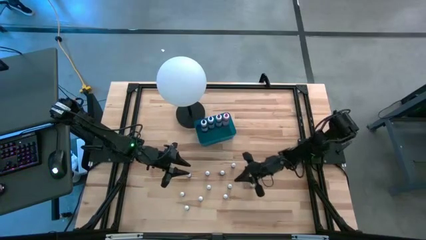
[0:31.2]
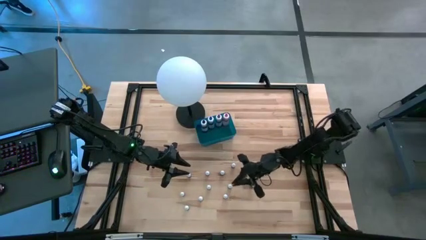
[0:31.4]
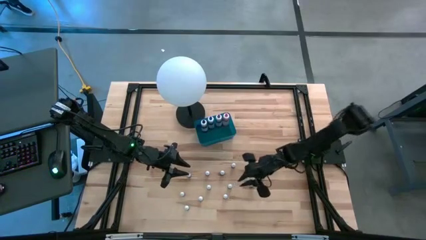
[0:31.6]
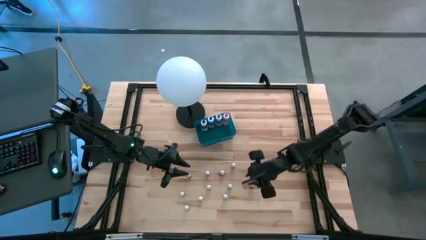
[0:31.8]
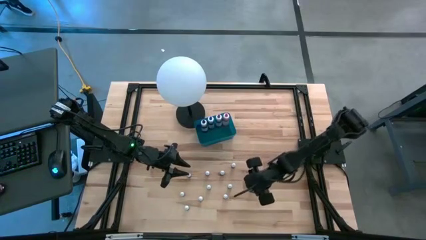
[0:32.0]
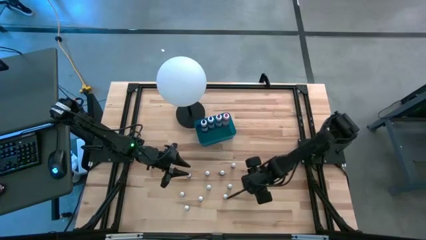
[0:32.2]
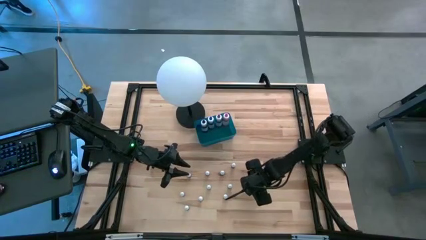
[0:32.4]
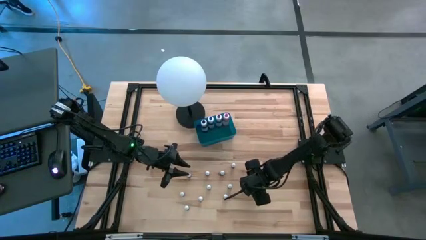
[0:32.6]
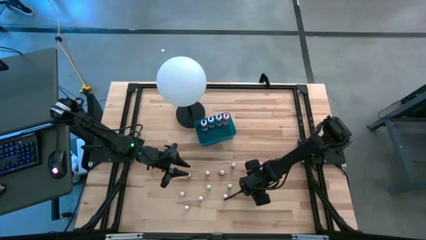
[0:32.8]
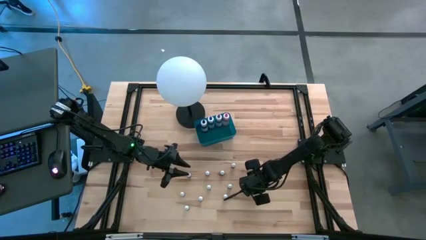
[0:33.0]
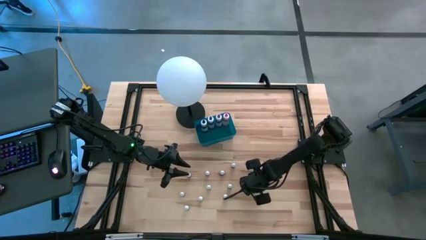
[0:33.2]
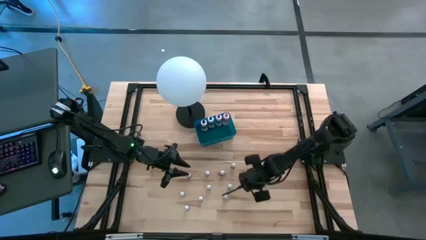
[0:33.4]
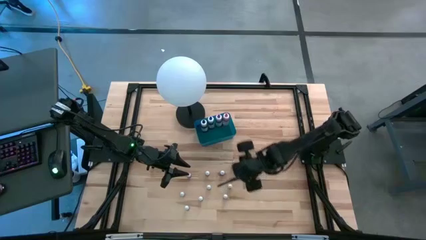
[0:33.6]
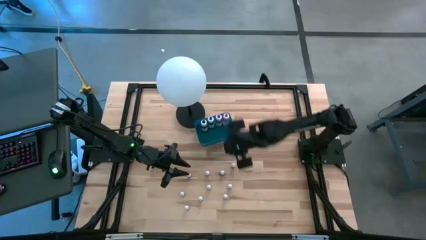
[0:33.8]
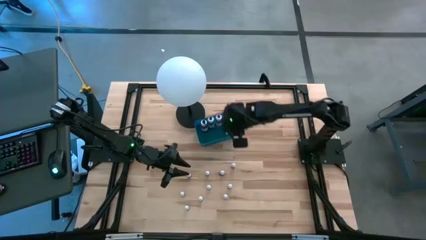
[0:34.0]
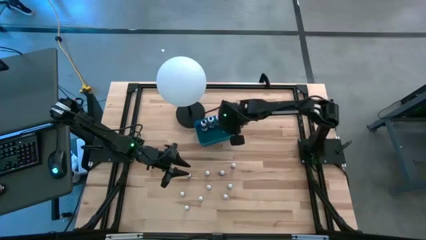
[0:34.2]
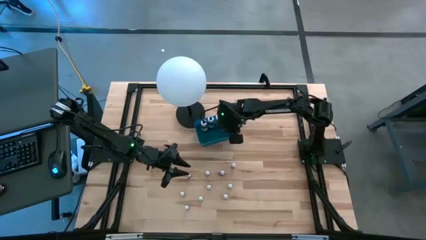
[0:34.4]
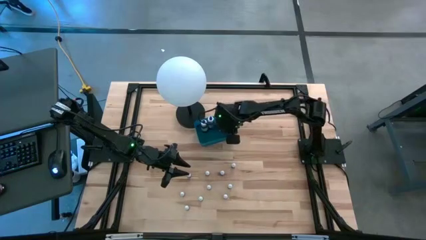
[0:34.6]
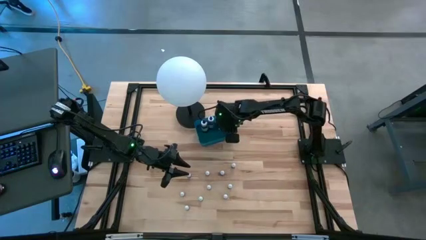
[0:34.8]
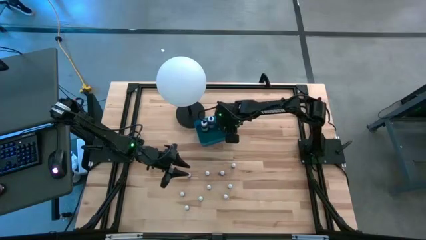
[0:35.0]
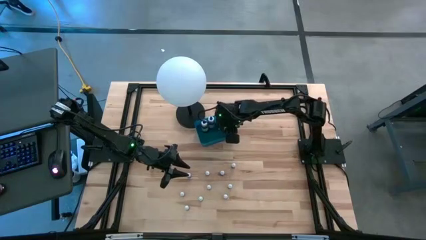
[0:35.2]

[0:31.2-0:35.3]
Task: Pick & Place food coloring
Put the black food coloring bottle into the bin

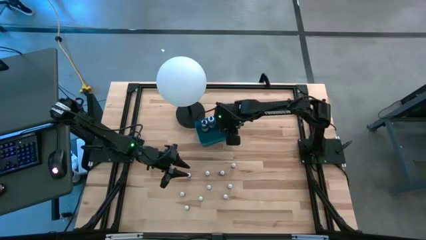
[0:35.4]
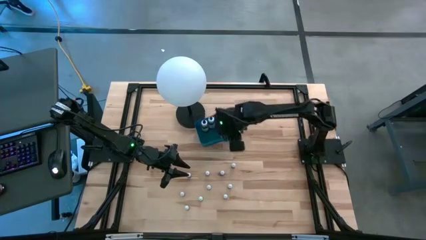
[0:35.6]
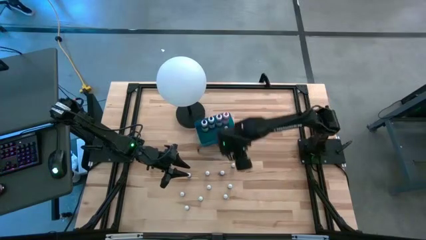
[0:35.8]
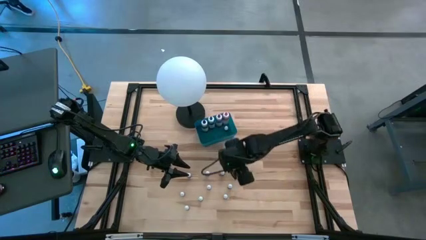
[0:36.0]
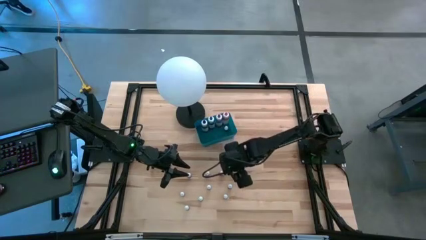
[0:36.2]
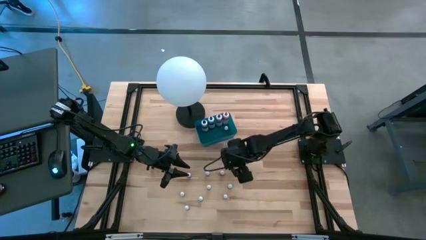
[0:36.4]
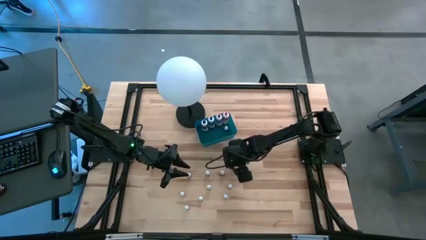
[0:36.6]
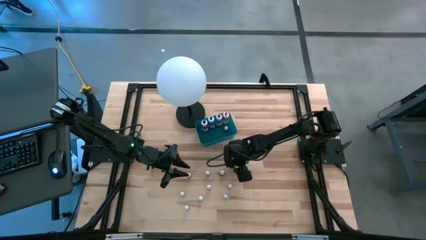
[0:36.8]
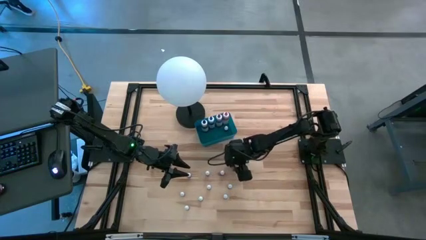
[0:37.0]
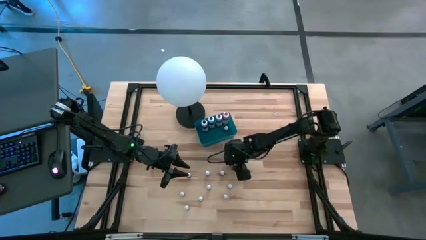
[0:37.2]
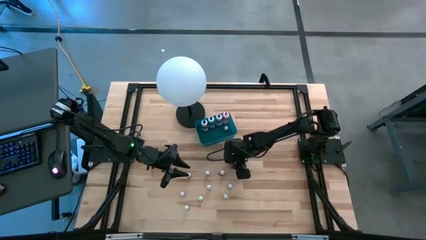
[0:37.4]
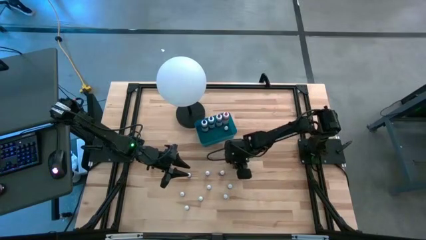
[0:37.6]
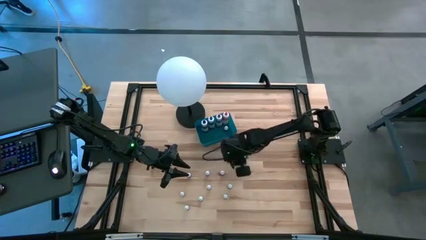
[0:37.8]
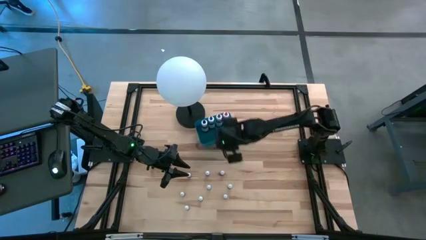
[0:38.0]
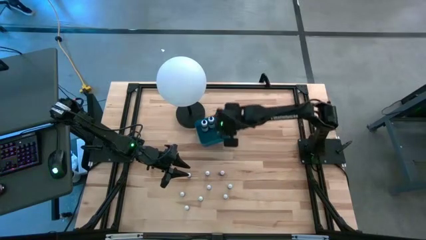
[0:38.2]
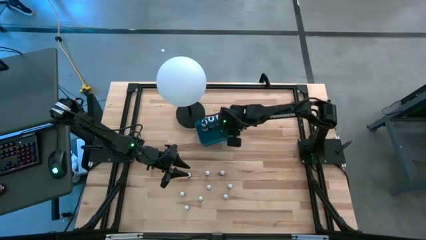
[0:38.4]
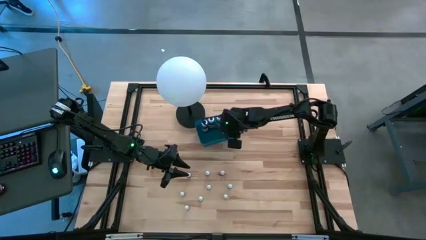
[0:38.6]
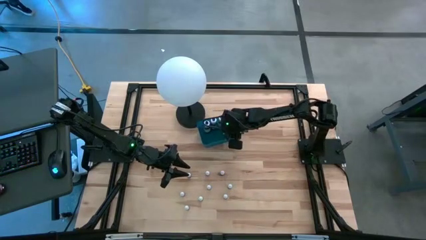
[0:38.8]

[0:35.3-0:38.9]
Put the black food coloring bottle into the bin

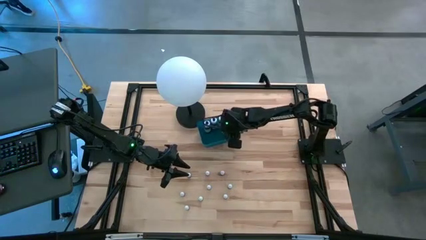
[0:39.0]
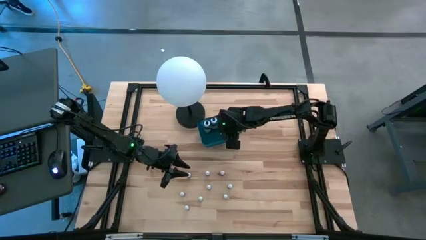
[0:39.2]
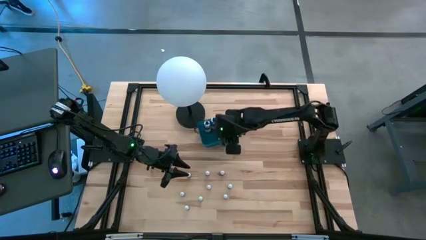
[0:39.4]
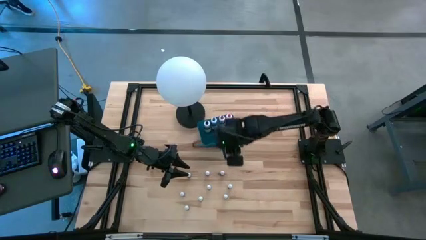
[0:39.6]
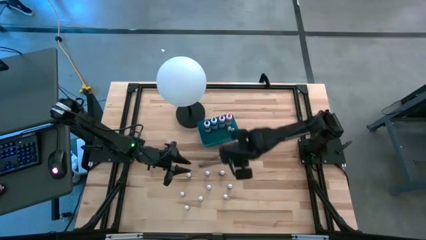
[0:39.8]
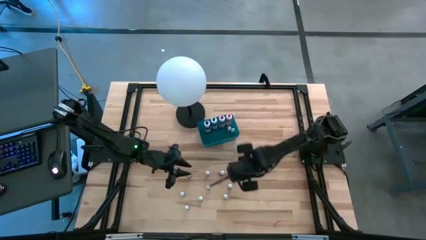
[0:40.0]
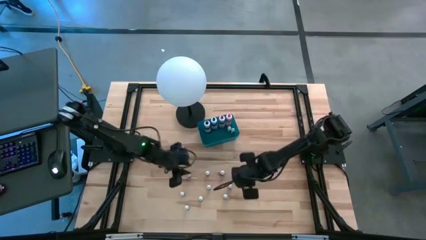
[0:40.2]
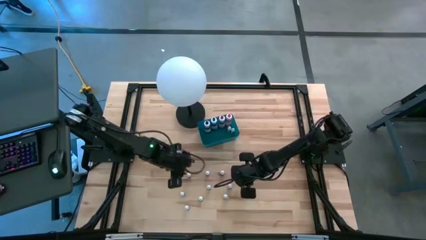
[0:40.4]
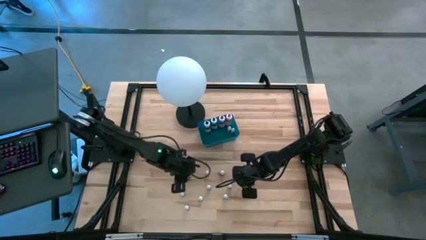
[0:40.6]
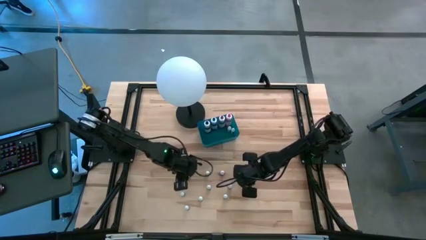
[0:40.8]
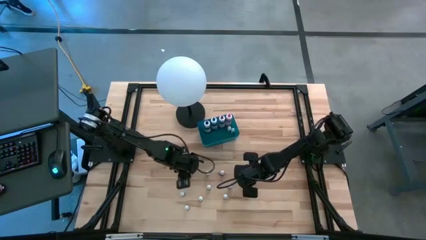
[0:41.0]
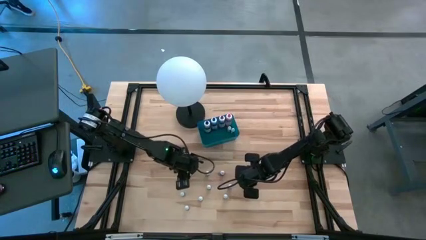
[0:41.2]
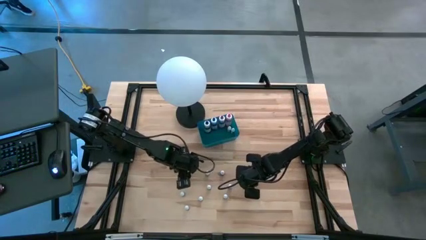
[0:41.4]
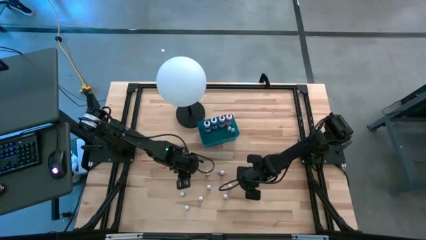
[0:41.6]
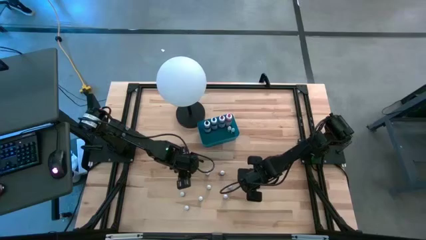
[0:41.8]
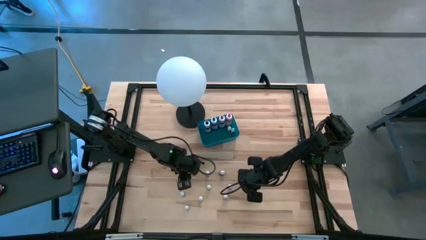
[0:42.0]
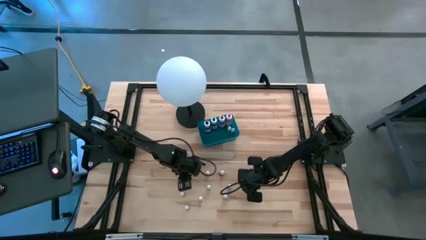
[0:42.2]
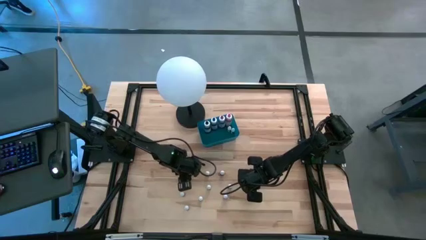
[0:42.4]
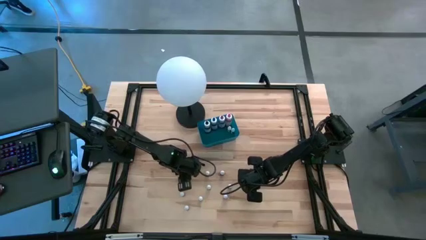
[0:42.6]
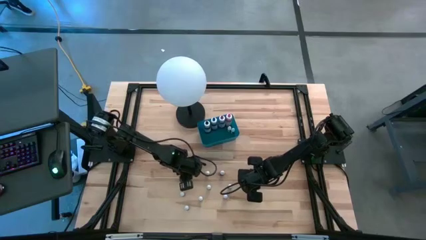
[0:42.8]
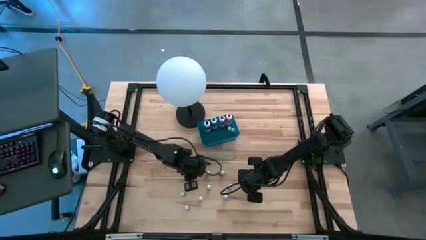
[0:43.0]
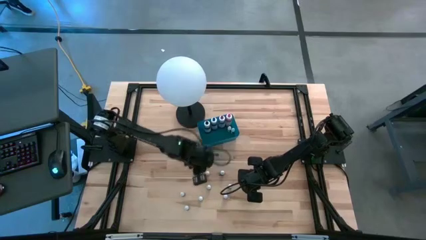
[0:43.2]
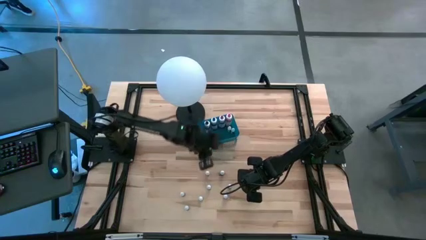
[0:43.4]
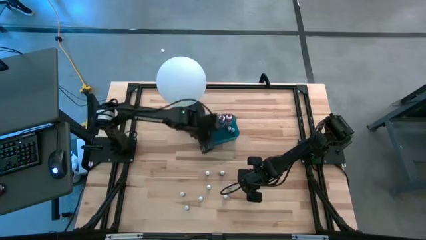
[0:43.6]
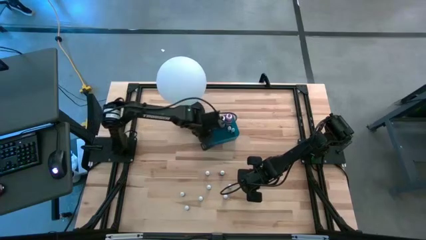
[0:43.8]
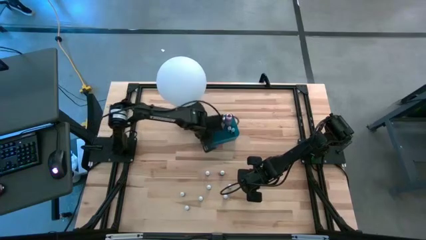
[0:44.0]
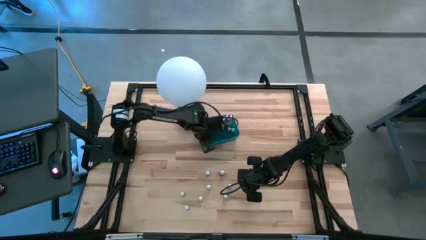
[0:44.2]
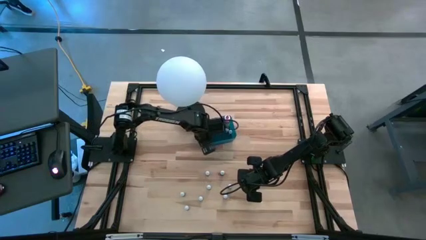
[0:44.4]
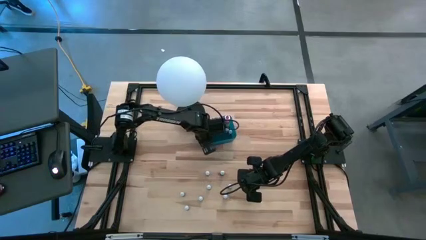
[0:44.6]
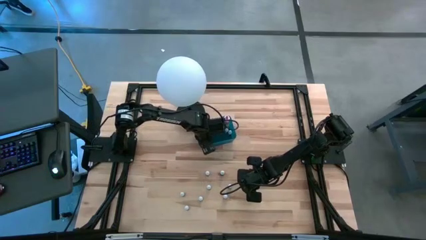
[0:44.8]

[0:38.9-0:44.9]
Put the green food coloring bottle into the bin

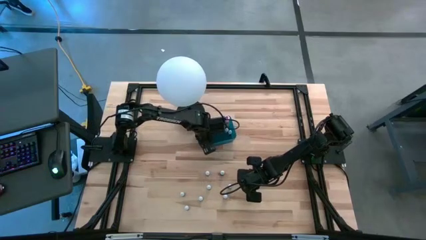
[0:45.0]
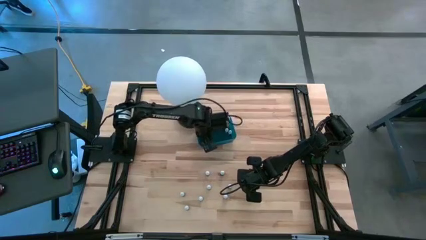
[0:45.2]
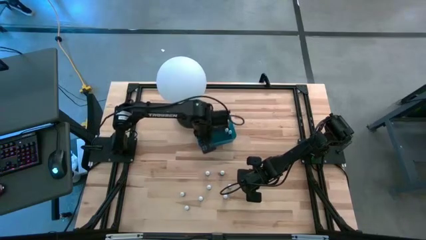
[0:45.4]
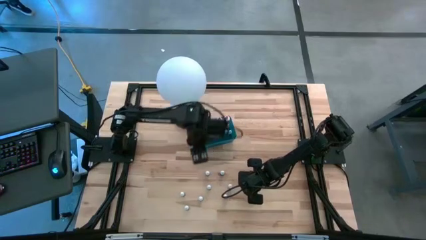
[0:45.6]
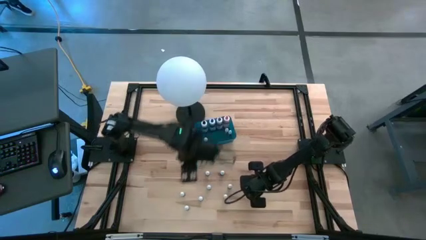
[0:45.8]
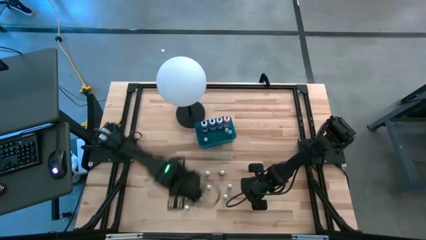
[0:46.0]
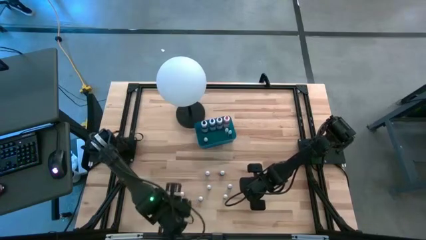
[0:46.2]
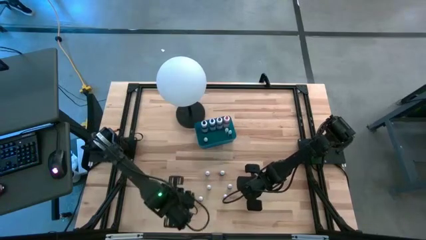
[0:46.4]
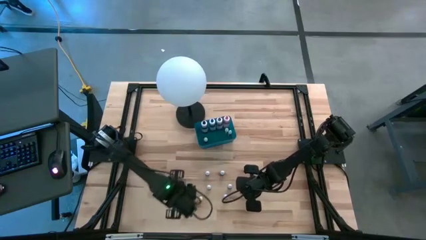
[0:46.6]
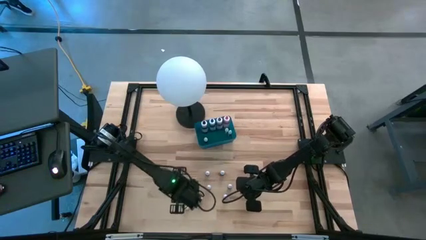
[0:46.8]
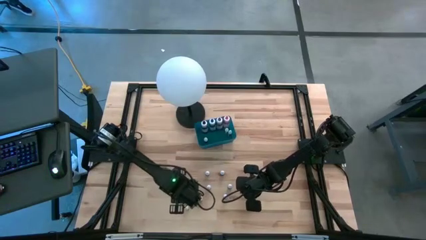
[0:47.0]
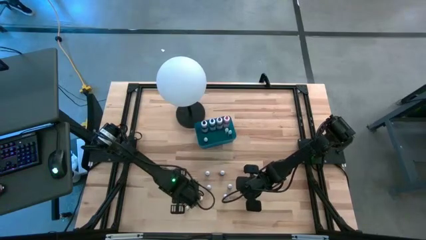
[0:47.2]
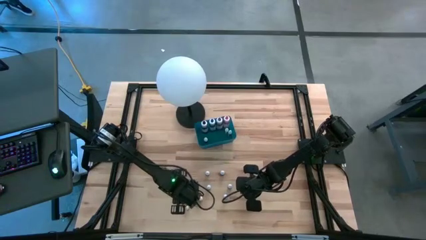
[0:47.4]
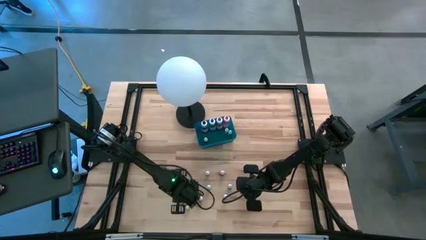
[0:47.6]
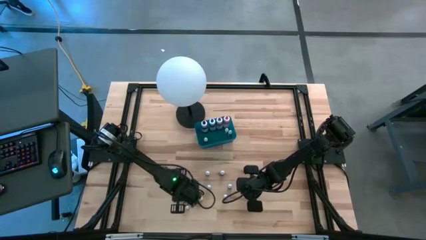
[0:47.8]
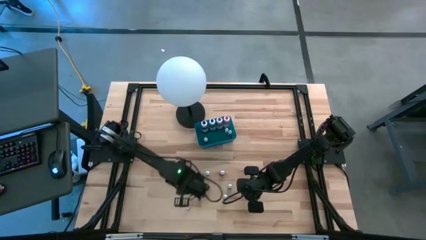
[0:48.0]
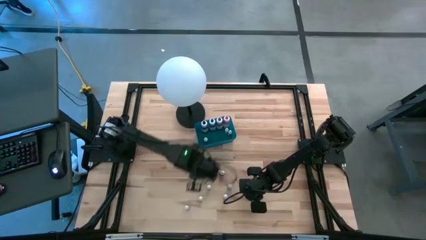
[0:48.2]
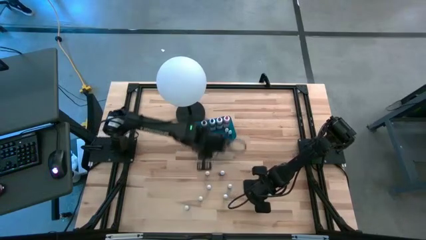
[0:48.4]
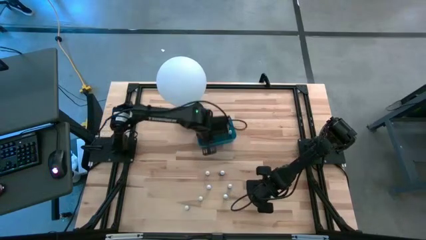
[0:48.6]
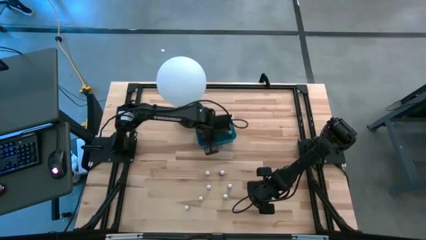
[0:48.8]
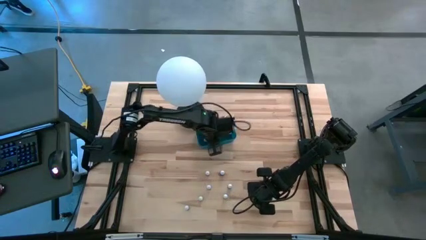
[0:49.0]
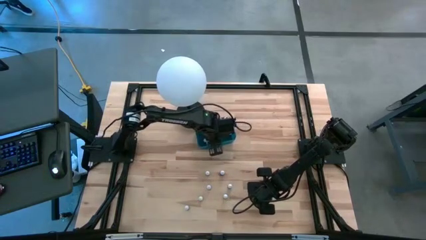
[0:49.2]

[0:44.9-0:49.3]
Put the purple food coloring bottle into the bin
